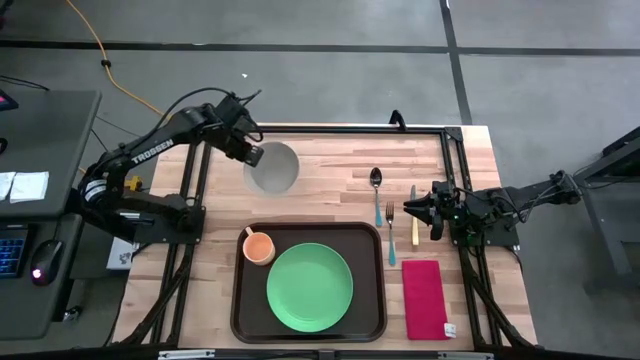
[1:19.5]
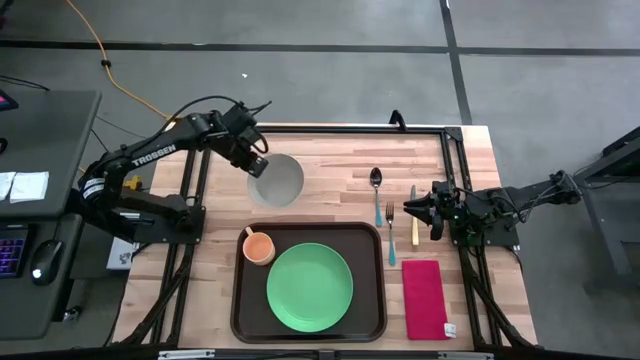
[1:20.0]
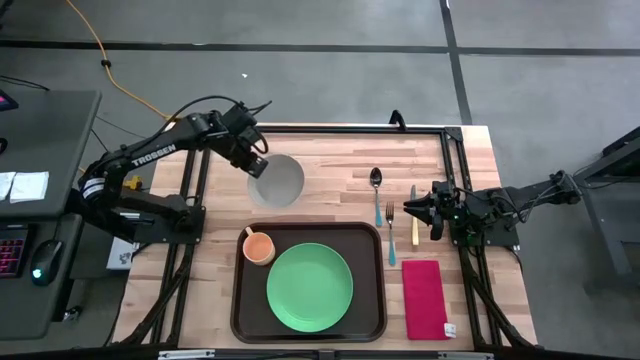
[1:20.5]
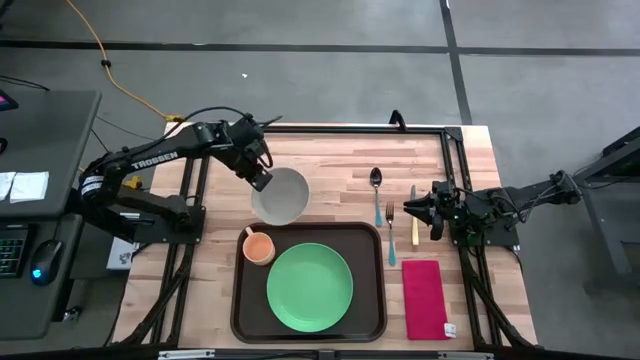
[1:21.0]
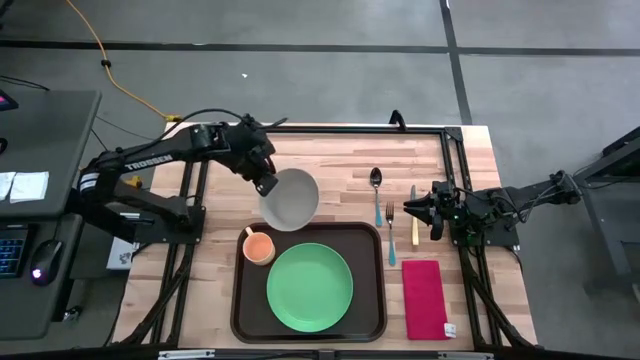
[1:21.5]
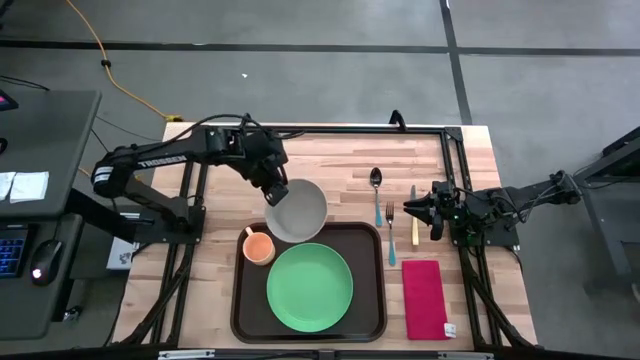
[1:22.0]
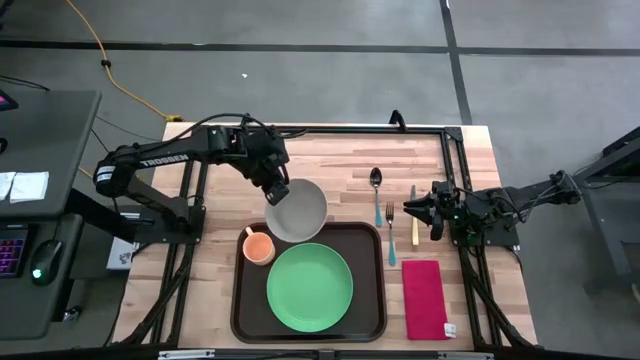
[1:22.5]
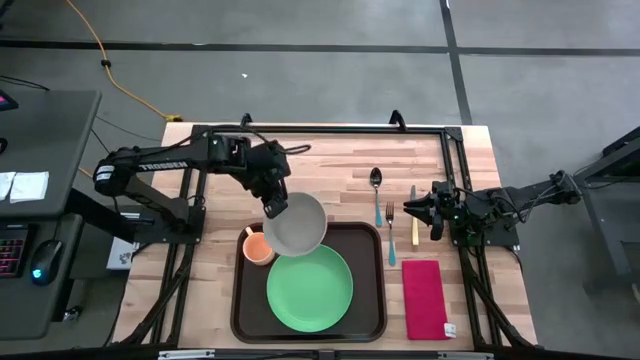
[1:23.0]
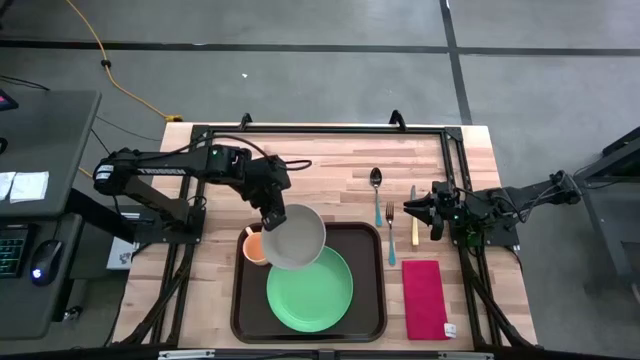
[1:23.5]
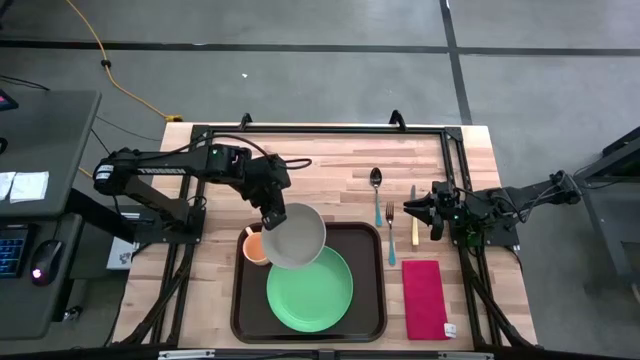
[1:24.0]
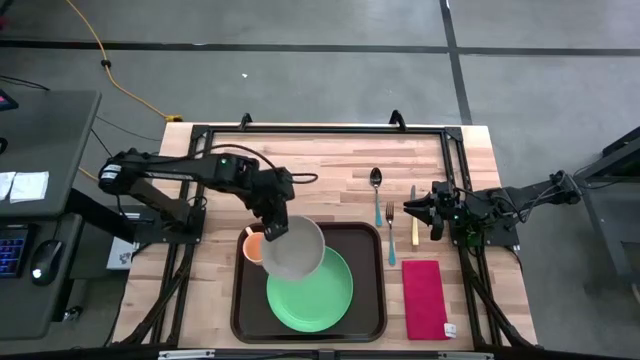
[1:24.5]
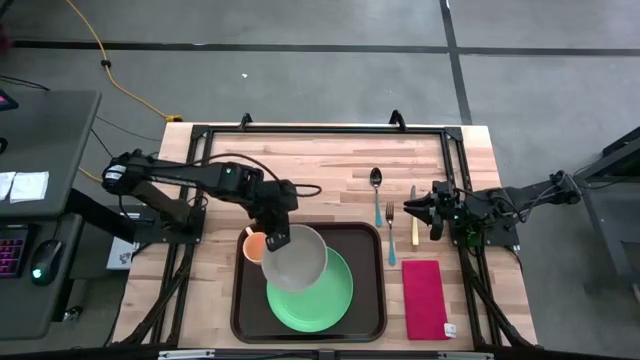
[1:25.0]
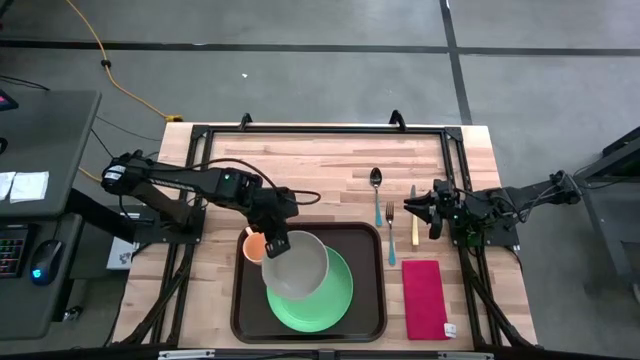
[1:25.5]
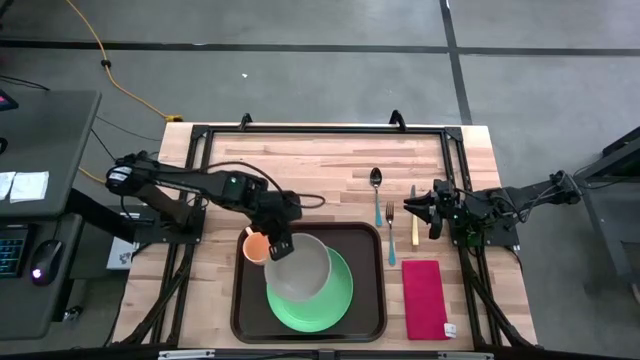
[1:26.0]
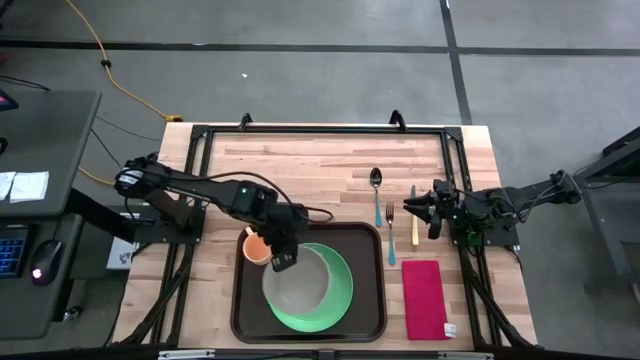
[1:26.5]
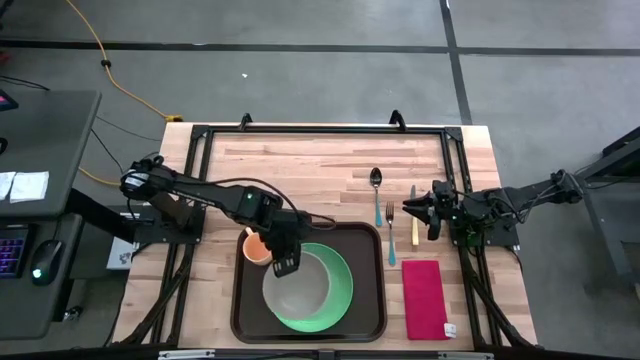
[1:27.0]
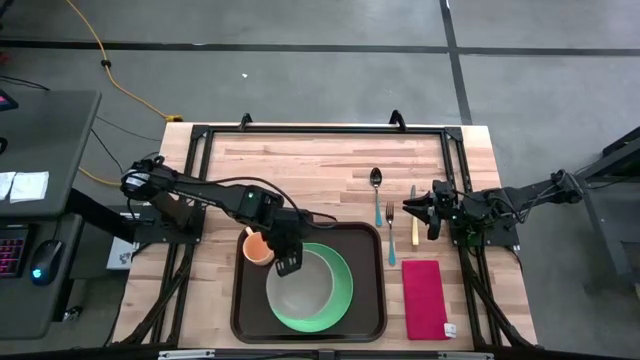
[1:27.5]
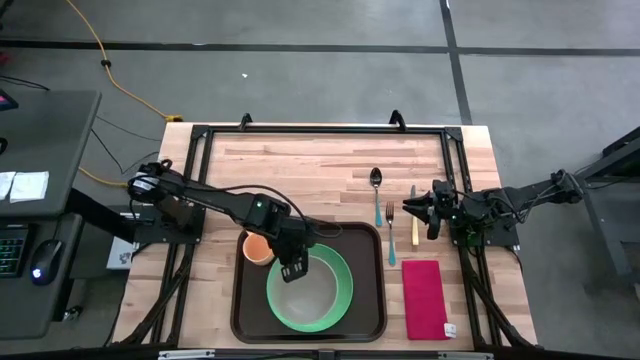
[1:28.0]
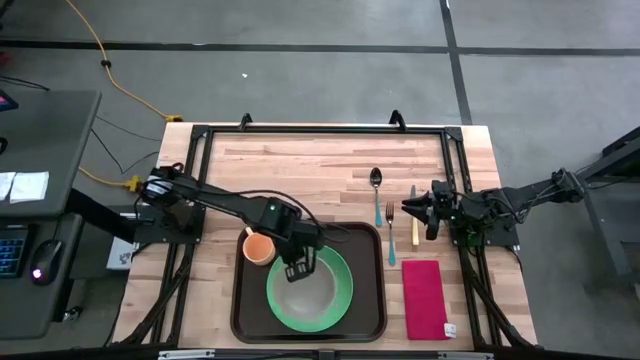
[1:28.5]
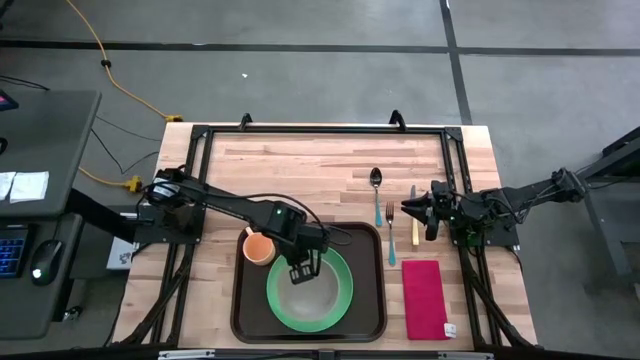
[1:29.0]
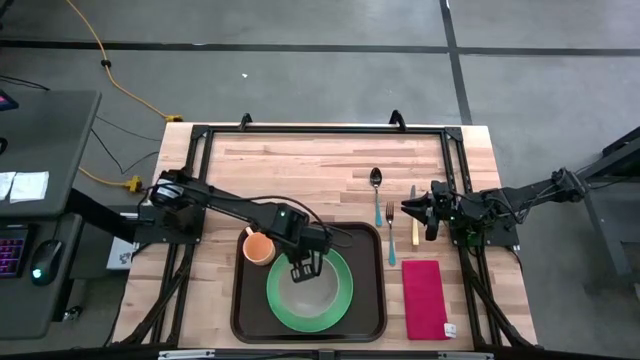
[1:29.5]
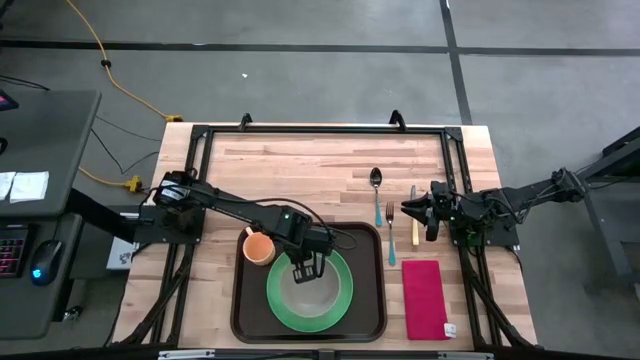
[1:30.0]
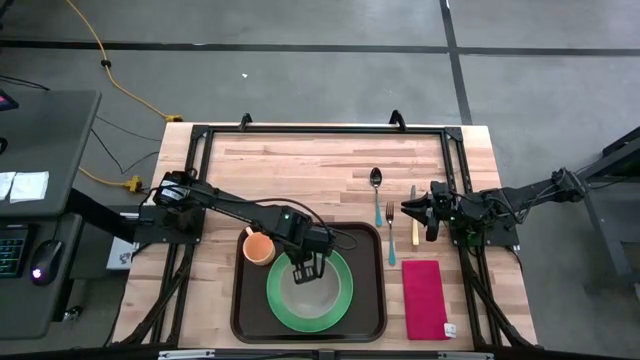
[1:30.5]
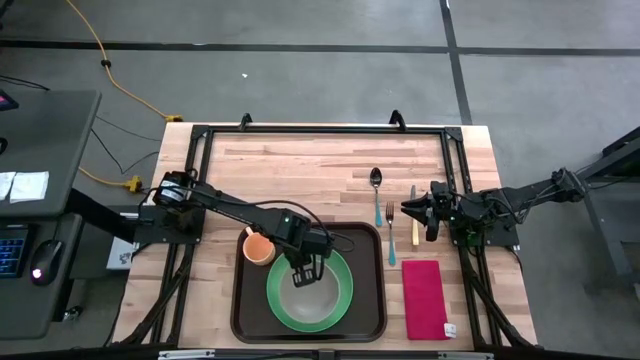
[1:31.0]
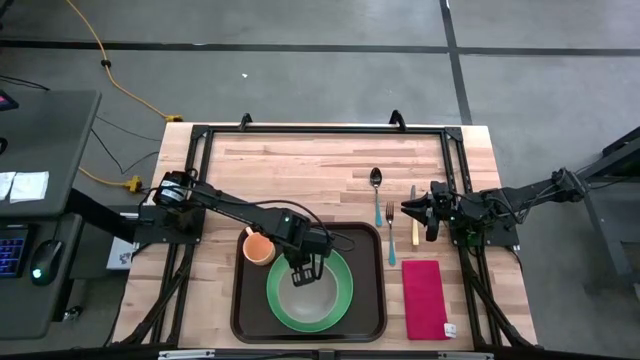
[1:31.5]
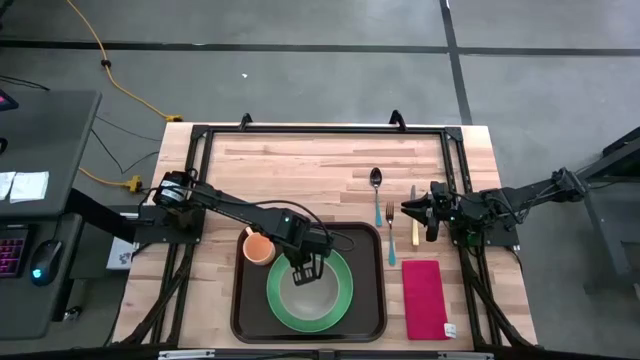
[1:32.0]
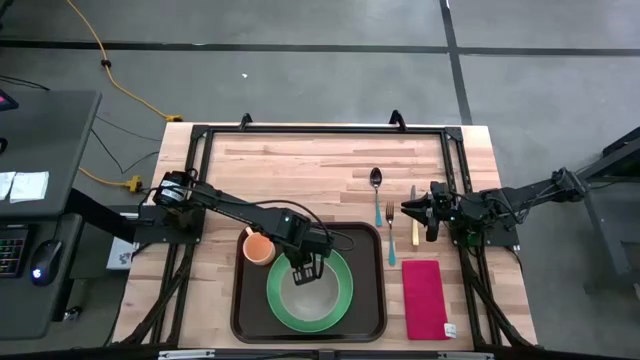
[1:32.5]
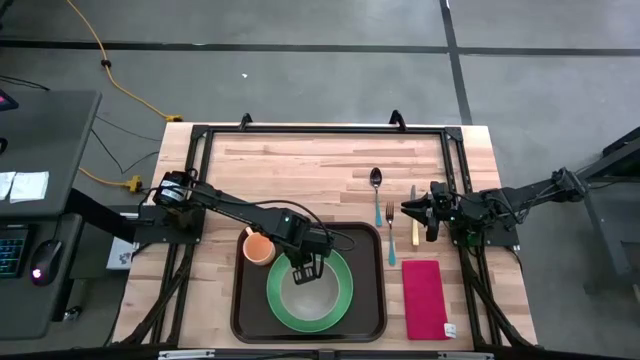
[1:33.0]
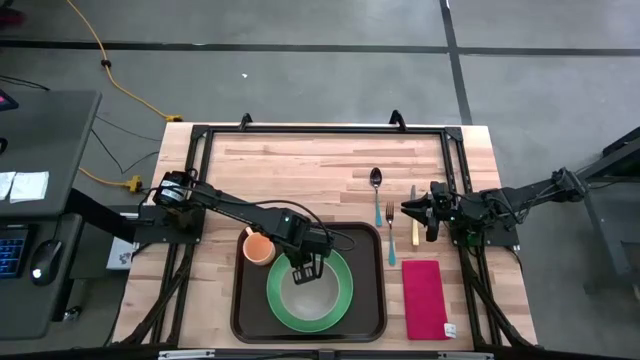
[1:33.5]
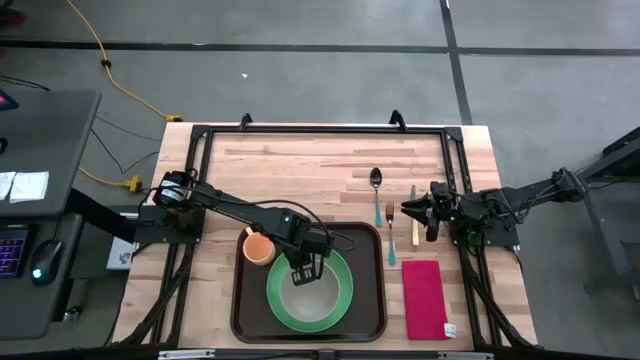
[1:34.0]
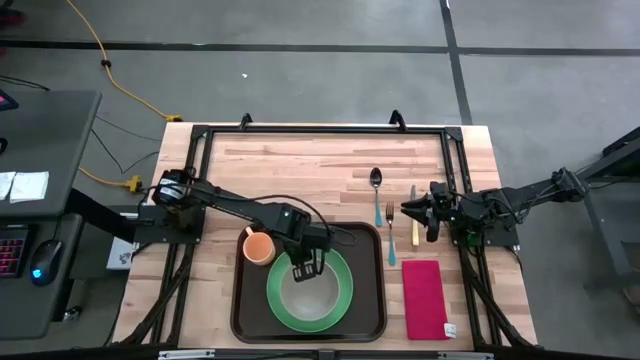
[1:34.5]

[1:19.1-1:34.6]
Task: Set up tray
Put the gray bowl on top of the green plate on the brown serving tray

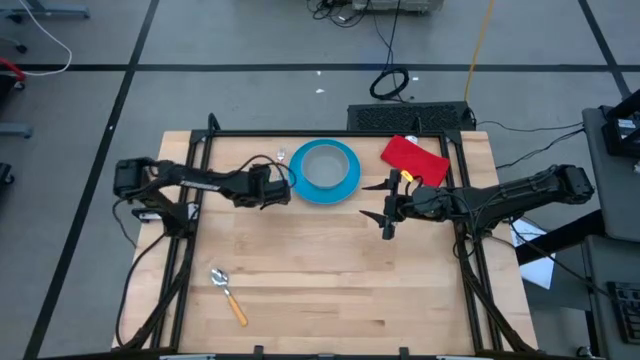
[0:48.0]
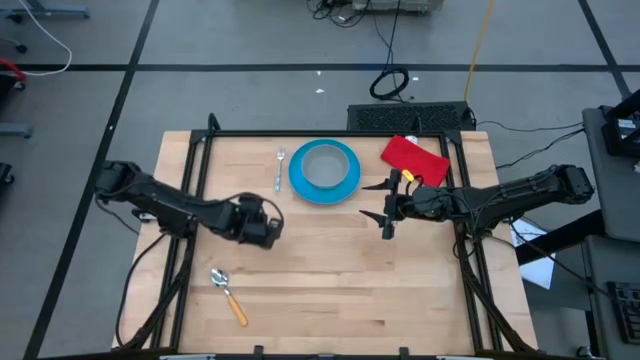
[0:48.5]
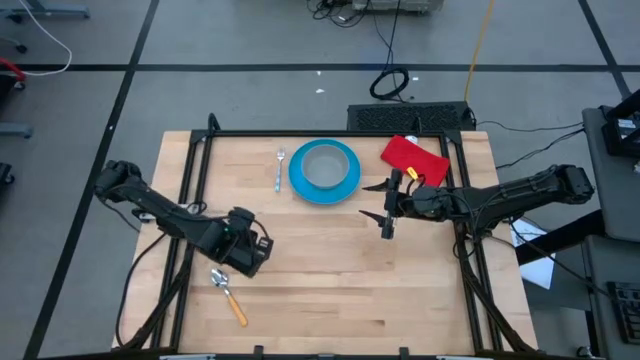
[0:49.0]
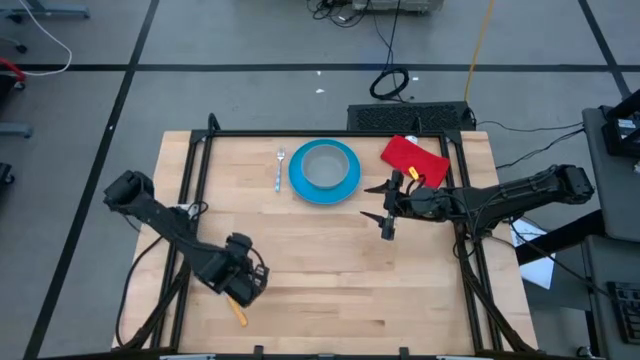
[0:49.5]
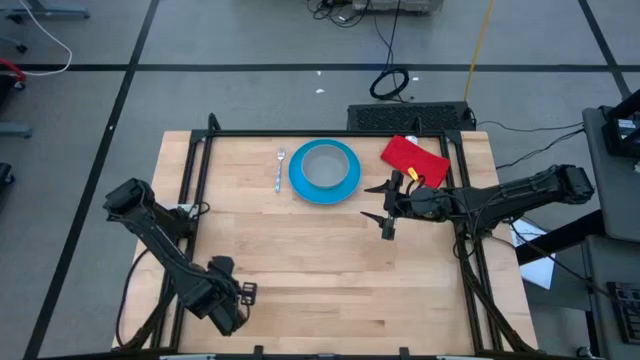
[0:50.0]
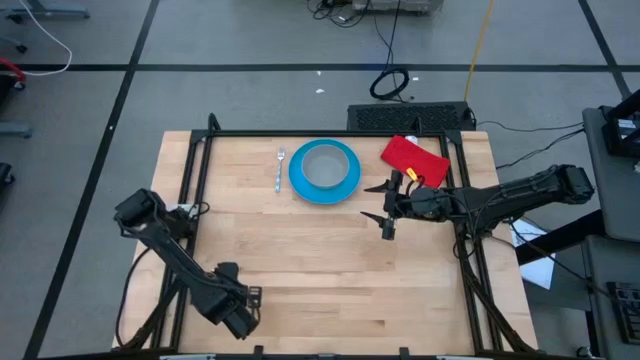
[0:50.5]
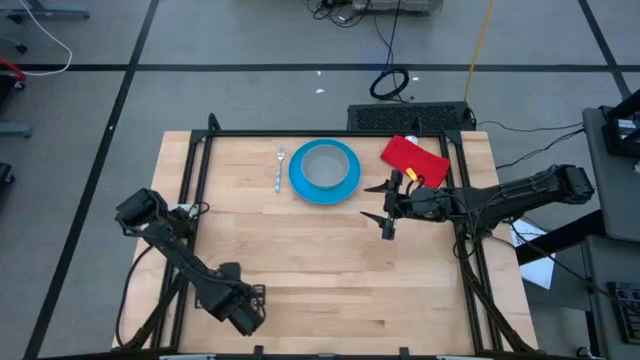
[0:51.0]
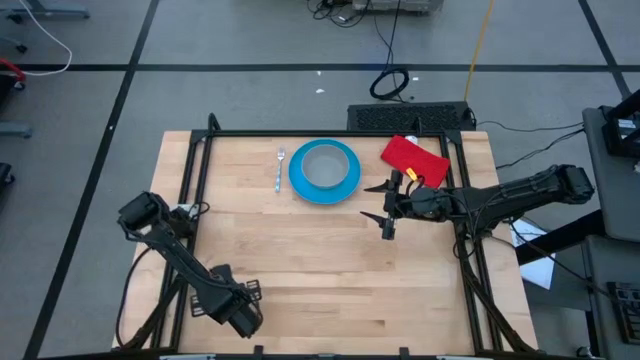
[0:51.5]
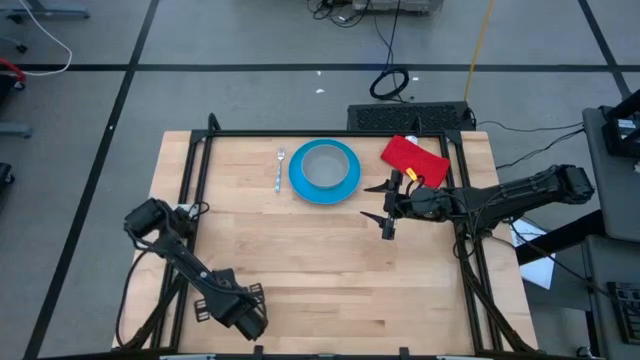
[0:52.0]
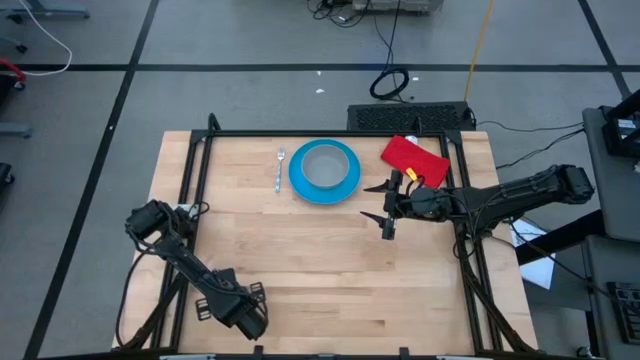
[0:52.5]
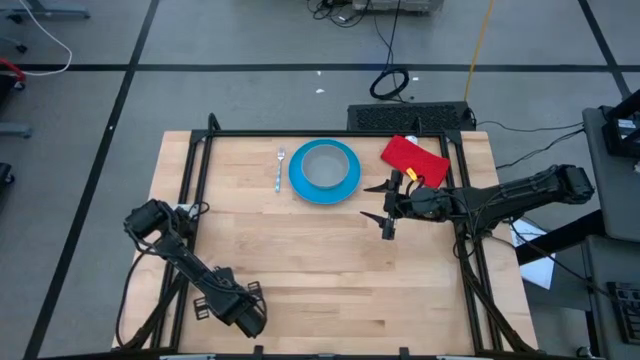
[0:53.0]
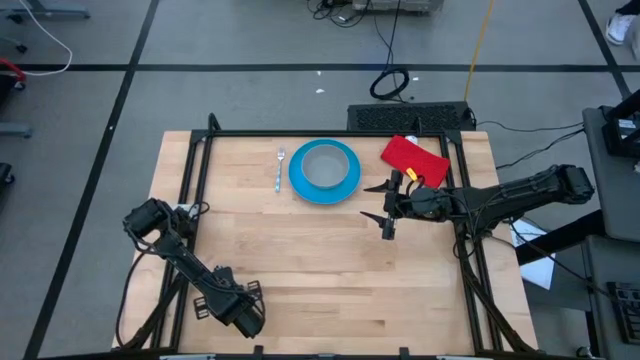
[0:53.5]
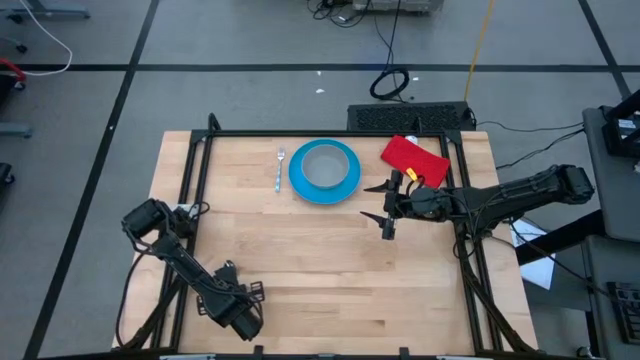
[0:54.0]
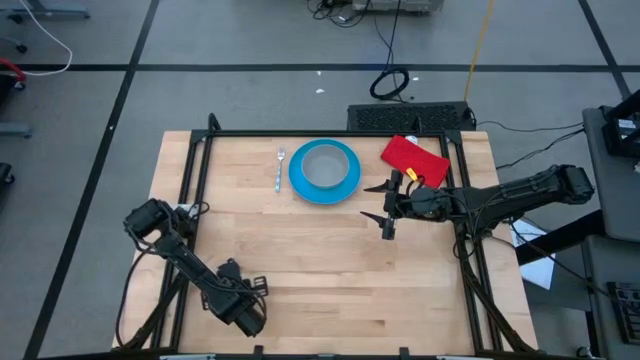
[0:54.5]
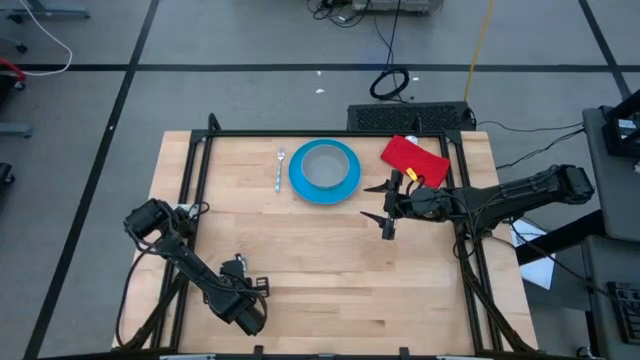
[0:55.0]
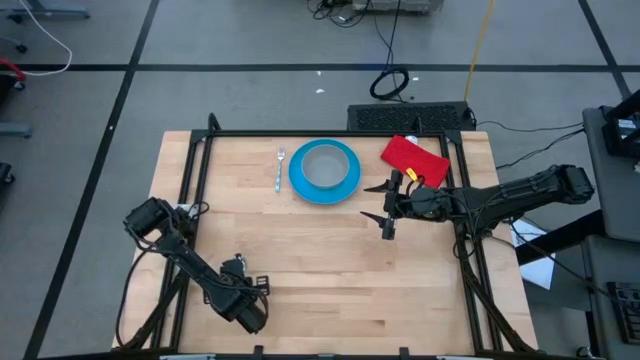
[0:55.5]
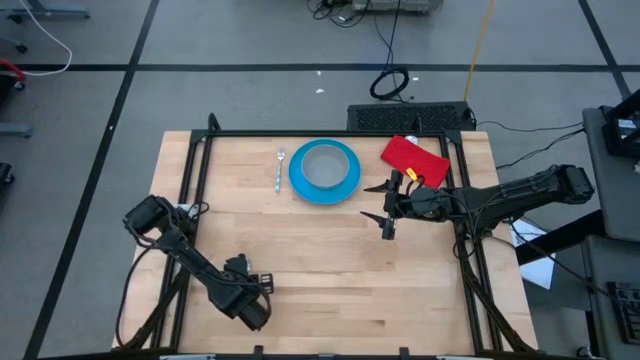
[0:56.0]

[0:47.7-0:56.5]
Task: Pick and place plate/cup/fork/spoon on tray
Put the yellow spoon into the grey bowl
